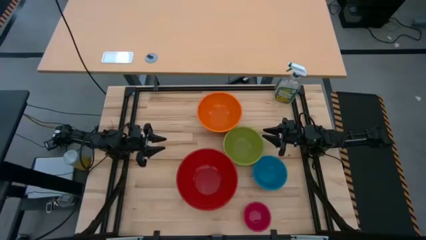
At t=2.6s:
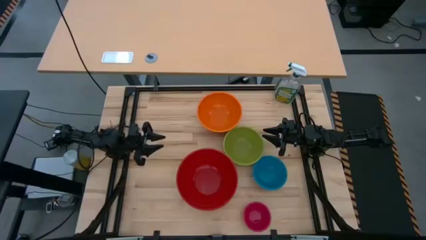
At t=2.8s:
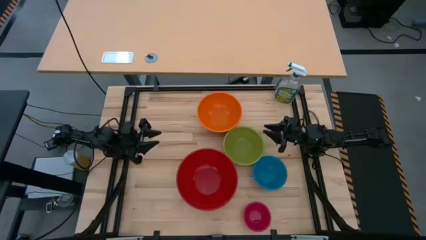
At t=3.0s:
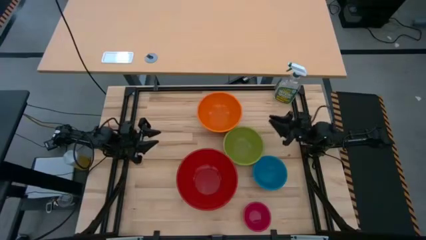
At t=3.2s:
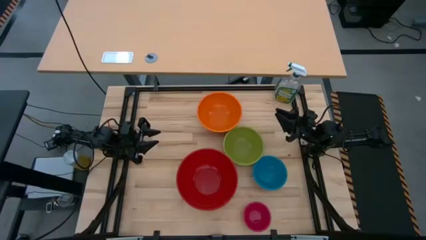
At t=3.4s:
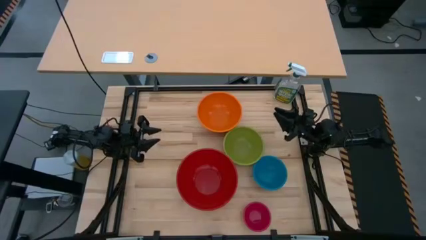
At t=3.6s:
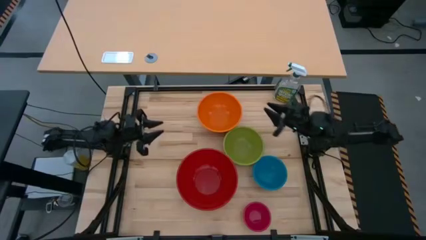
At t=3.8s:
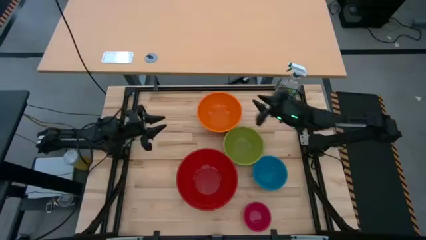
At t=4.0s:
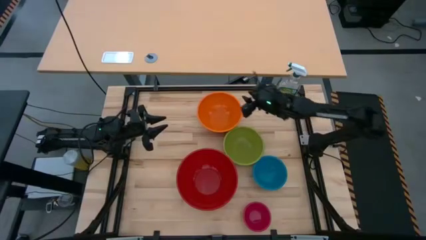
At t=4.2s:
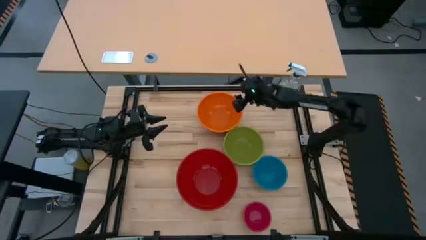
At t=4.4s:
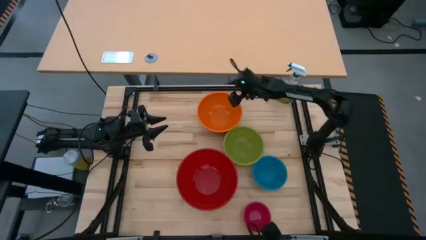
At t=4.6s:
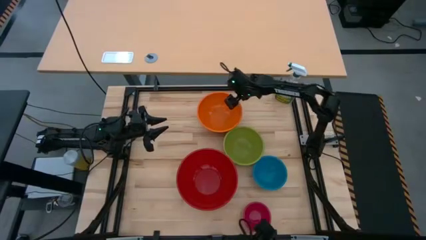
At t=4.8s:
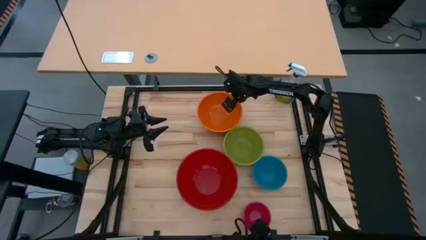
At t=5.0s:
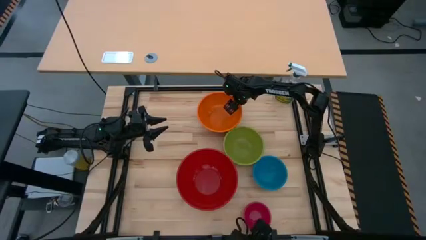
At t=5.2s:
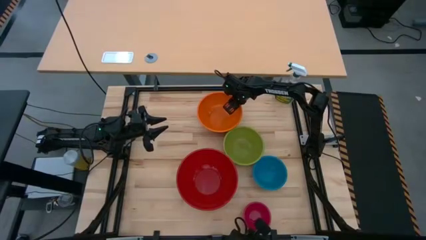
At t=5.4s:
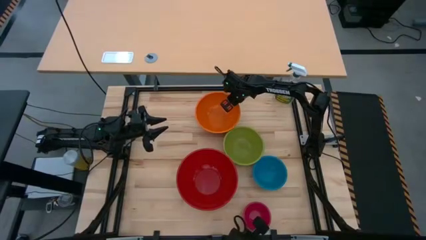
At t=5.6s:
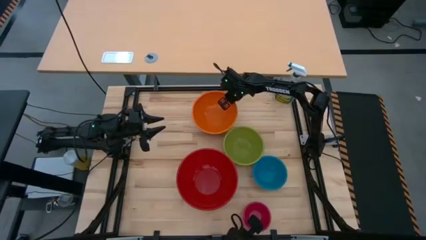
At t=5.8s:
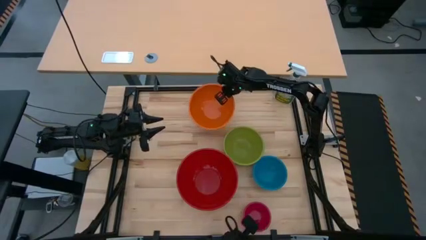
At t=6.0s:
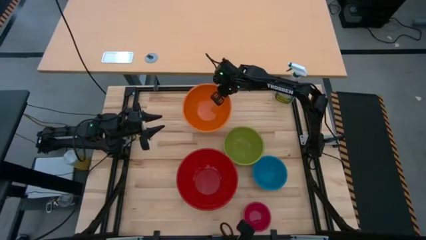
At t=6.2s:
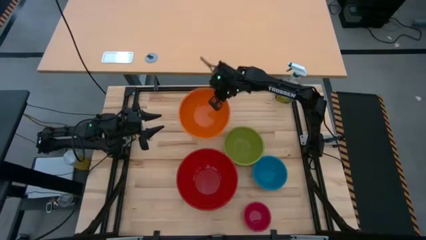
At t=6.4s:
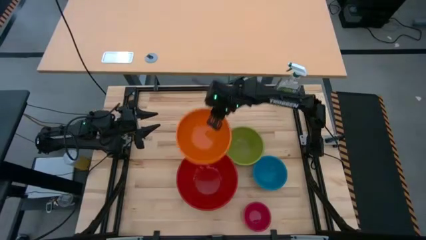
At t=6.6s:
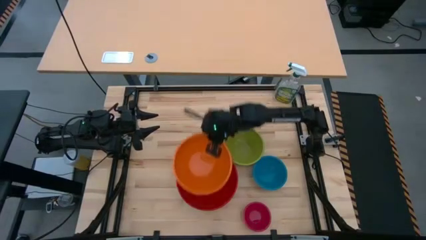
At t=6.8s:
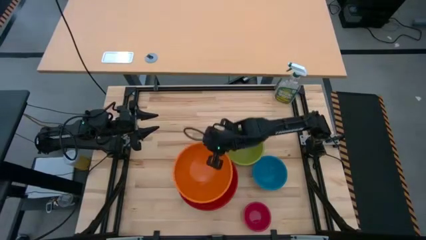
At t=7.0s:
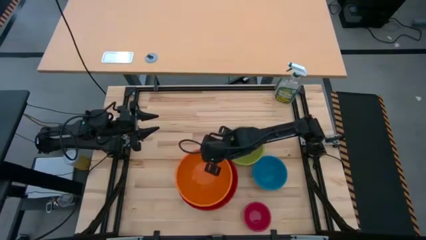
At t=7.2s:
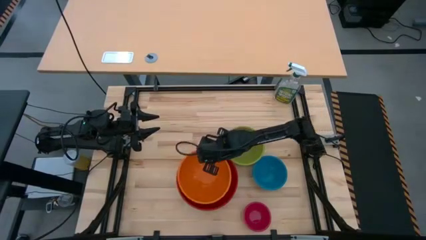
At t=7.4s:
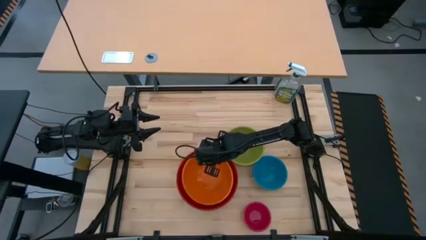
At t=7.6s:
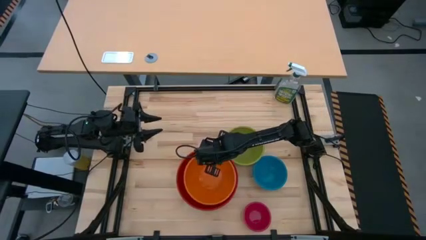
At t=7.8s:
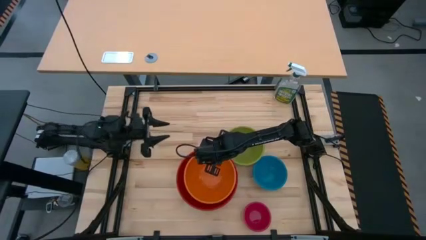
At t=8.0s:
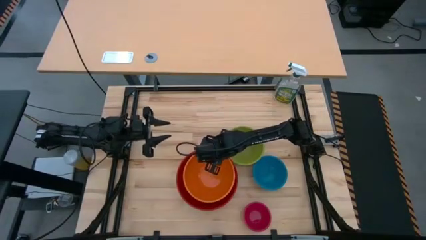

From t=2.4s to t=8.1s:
Stack the large orange bowl on top of the extra large red bowl

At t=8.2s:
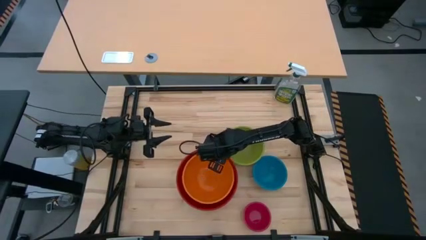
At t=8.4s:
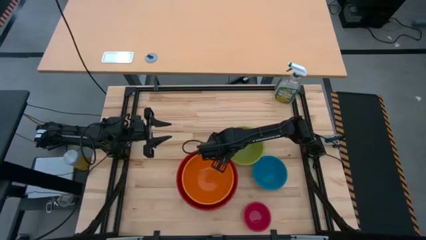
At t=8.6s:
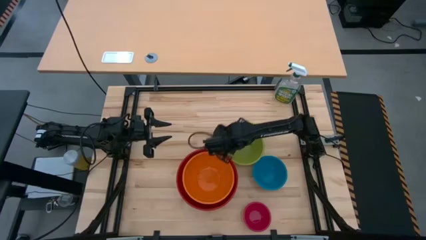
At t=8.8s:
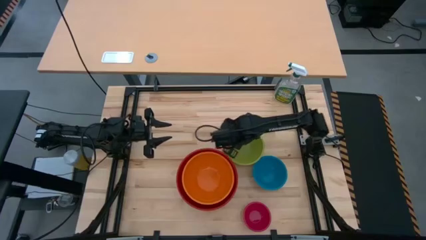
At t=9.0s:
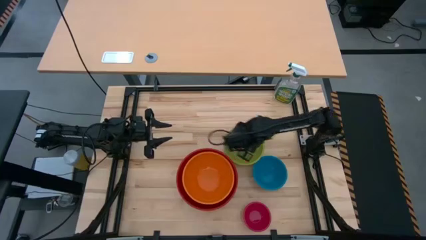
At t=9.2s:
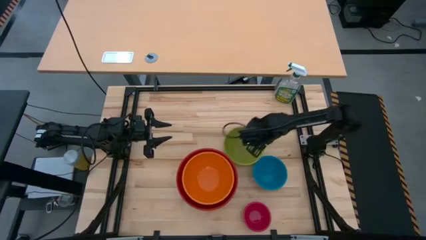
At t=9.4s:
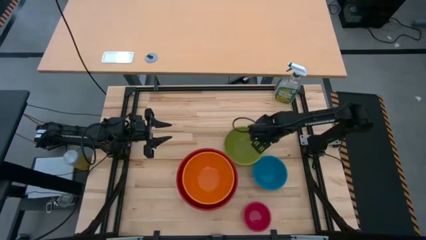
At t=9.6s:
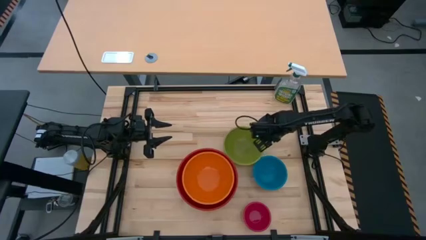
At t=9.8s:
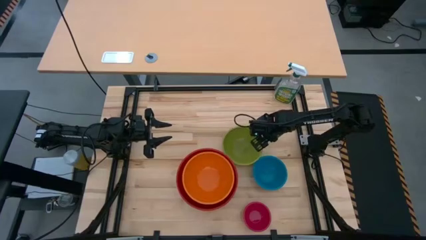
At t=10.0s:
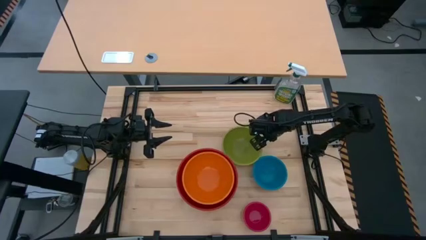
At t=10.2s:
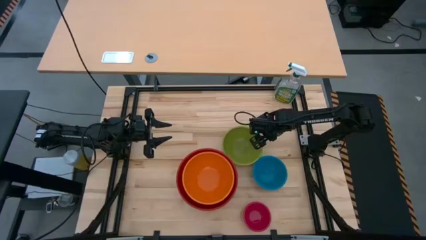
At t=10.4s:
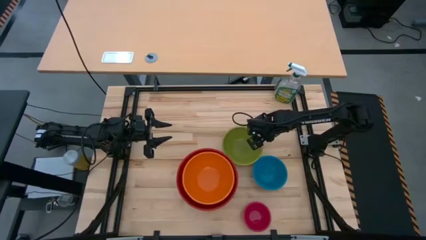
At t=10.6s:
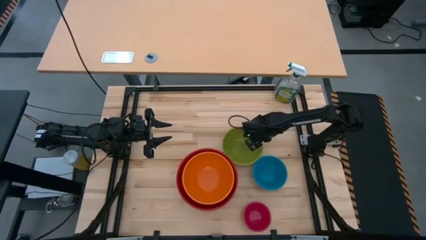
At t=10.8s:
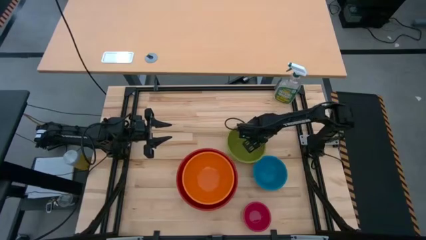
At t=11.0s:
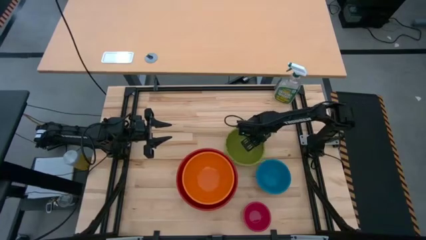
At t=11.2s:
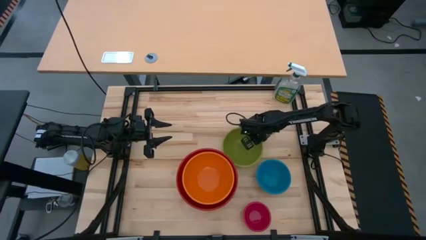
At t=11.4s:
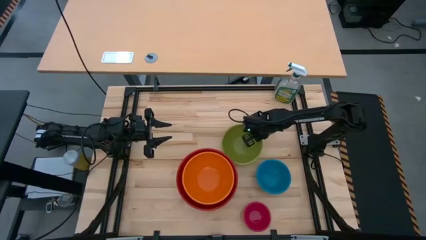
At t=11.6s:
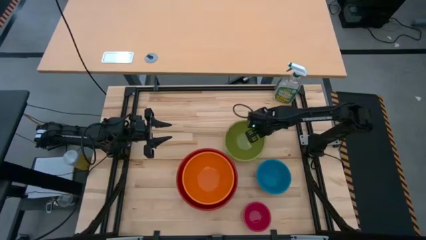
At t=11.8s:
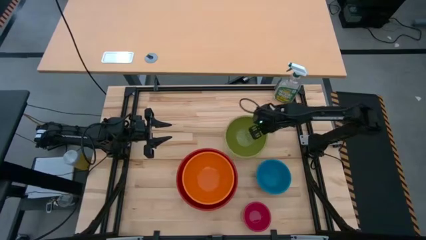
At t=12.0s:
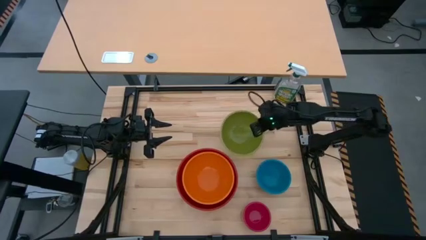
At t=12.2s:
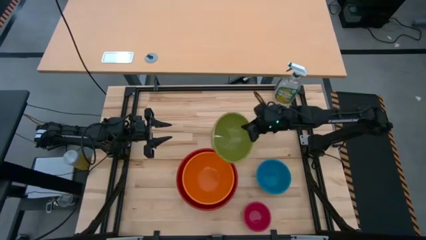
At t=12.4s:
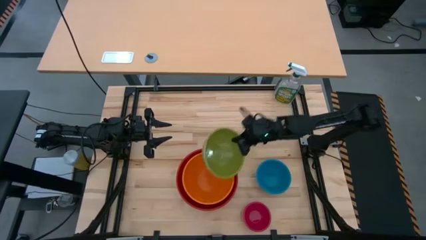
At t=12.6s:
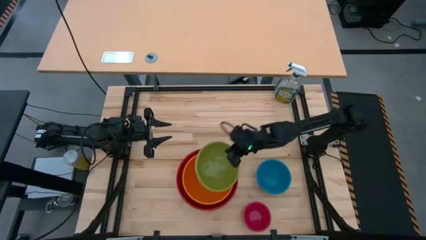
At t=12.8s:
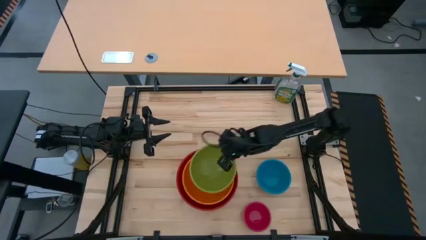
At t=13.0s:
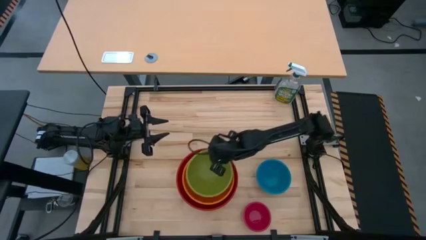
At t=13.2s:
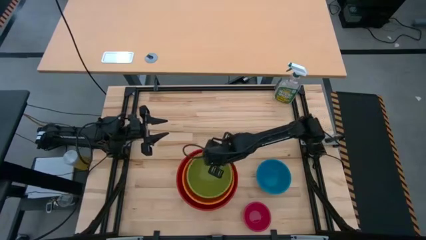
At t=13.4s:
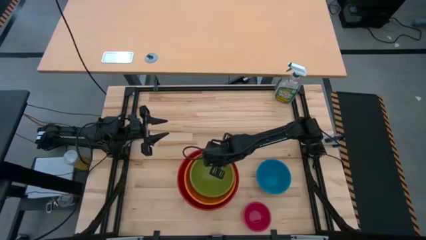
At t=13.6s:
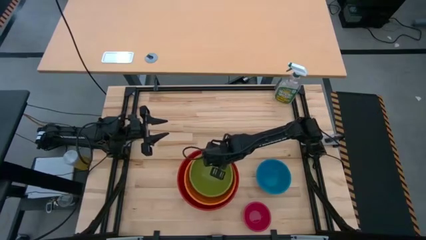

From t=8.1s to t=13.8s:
Stack the medium green bowl on top of the large orange bowl

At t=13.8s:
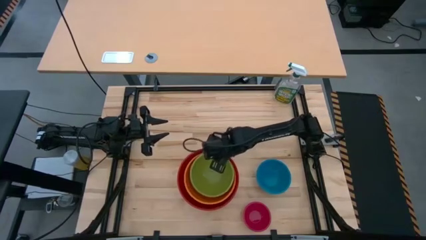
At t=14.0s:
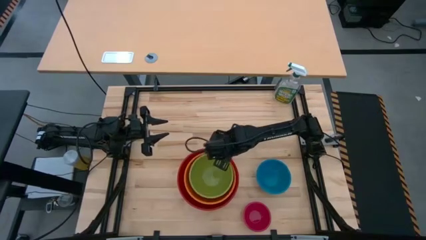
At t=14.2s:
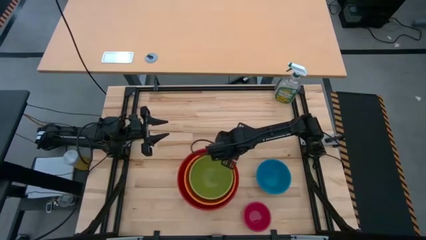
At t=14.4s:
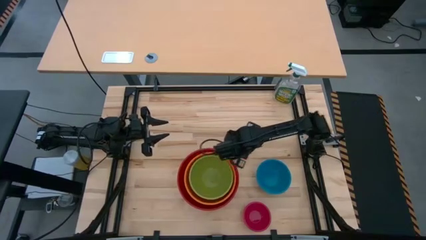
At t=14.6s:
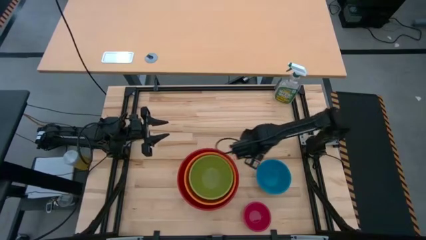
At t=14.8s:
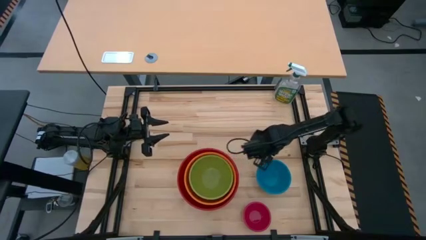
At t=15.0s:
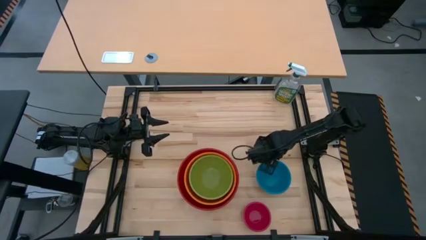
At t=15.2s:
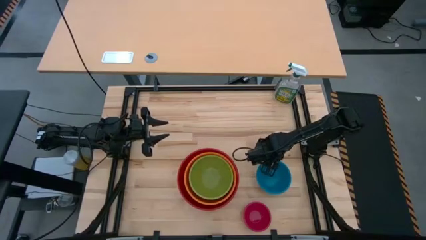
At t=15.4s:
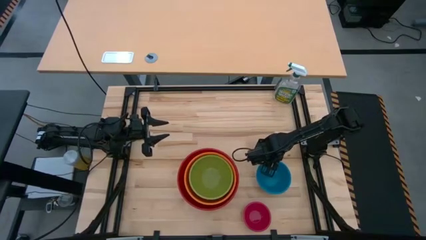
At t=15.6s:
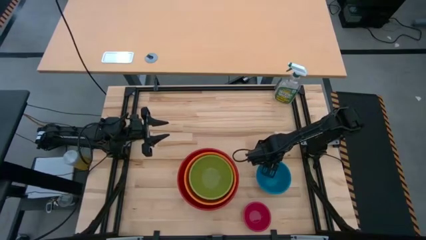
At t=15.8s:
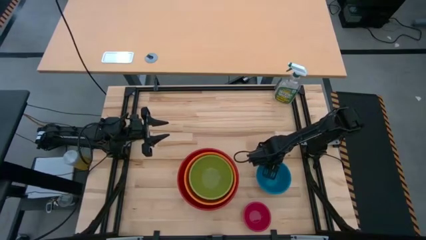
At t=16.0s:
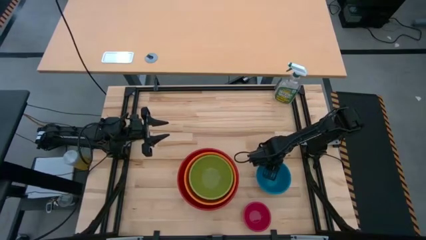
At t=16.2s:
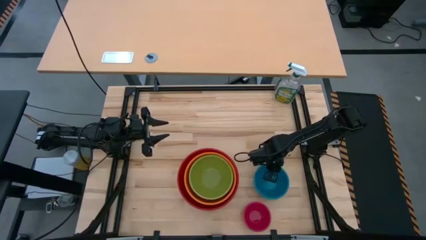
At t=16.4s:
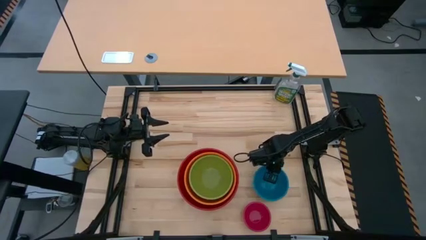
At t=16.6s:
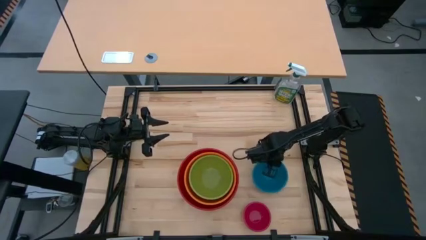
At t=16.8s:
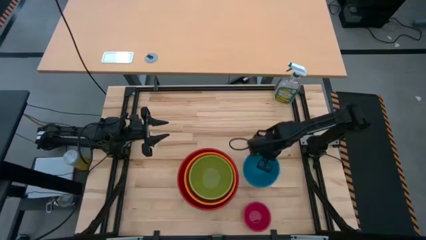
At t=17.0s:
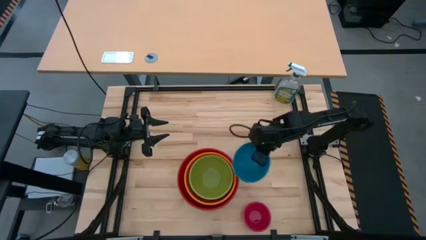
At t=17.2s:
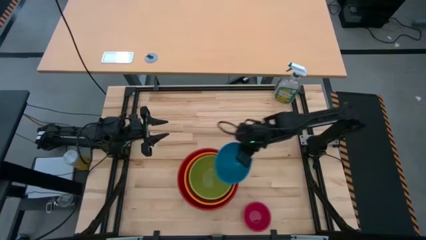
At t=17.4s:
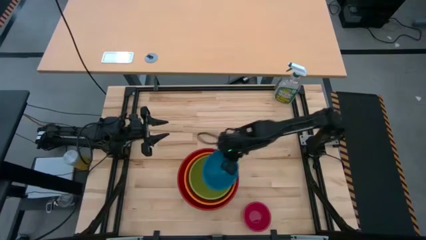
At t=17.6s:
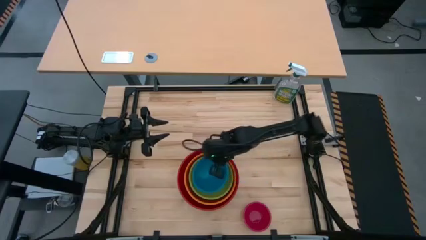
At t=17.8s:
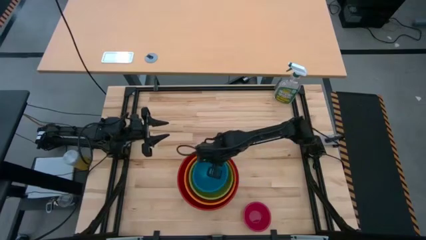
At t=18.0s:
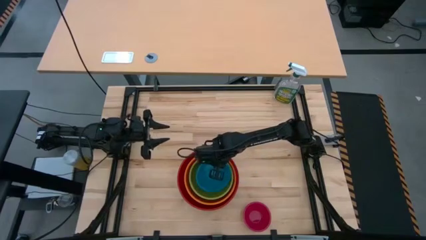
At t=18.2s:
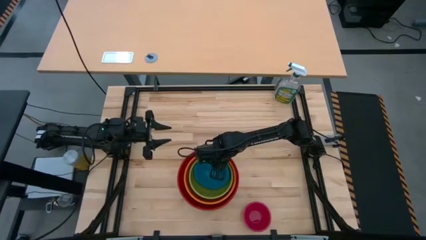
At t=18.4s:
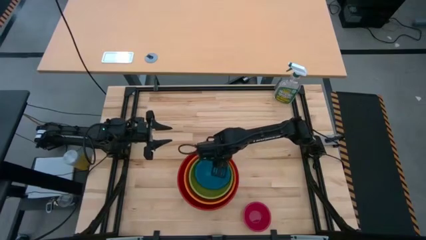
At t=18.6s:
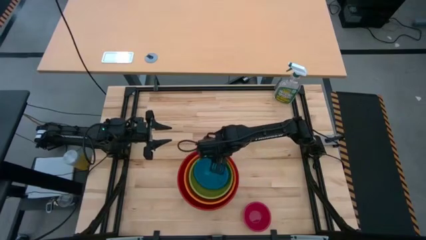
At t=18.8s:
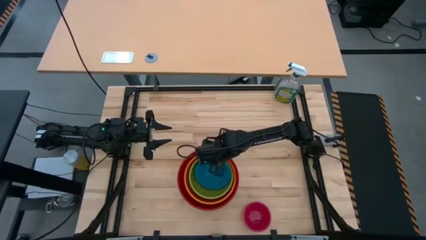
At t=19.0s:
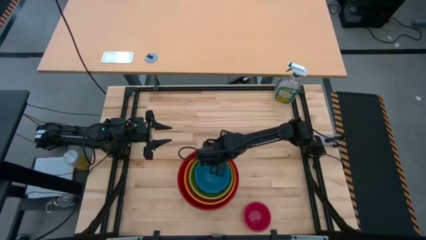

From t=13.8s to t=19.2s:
Stack the small blue bowl on top of the medium green bowl
